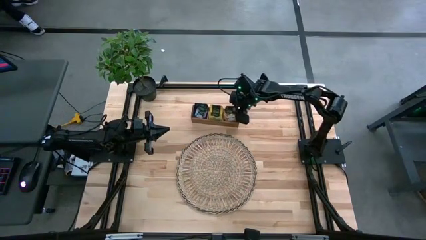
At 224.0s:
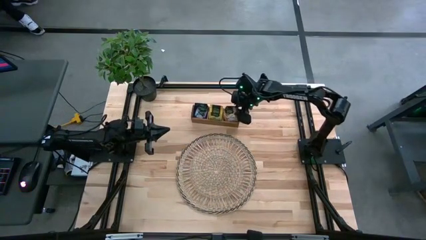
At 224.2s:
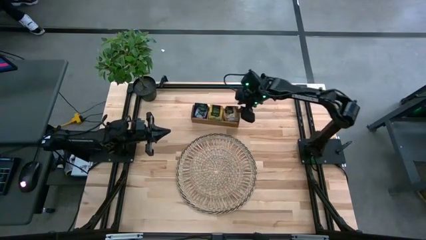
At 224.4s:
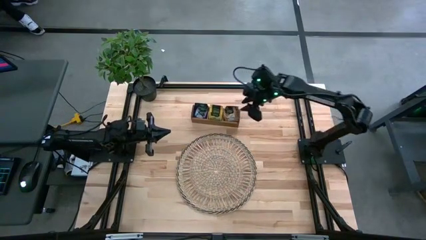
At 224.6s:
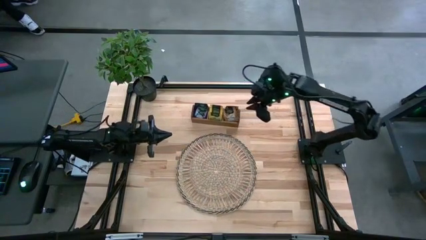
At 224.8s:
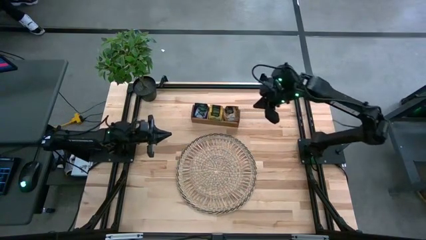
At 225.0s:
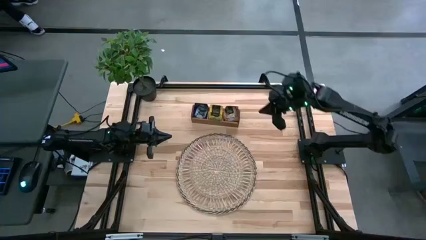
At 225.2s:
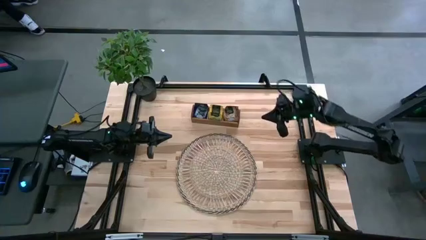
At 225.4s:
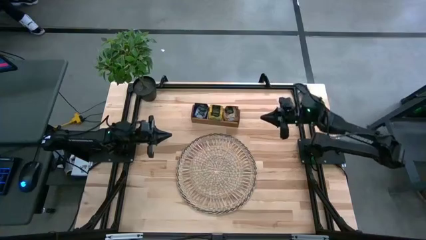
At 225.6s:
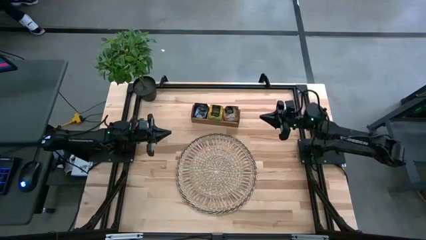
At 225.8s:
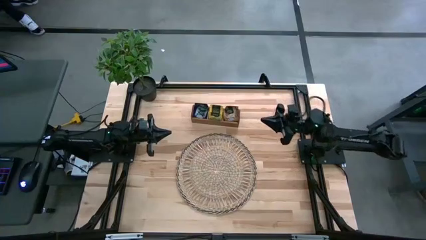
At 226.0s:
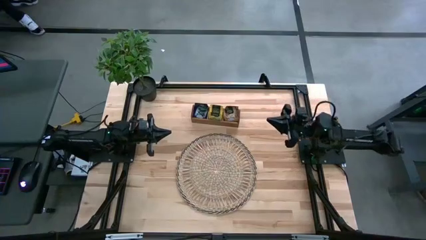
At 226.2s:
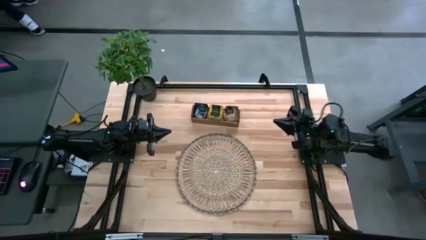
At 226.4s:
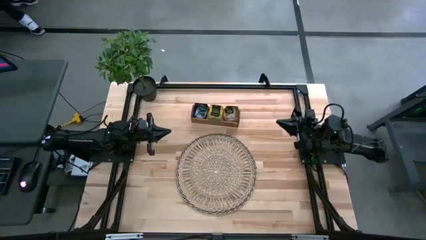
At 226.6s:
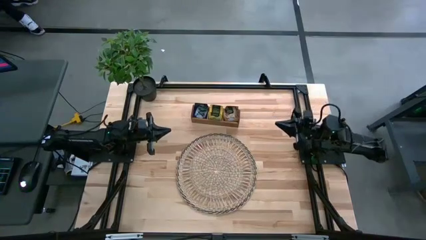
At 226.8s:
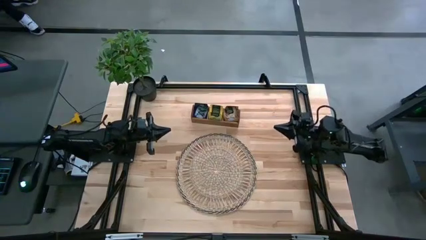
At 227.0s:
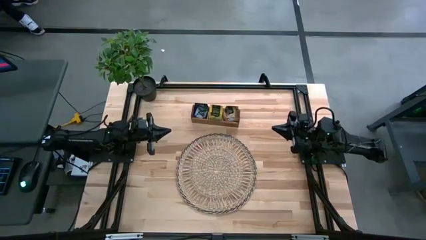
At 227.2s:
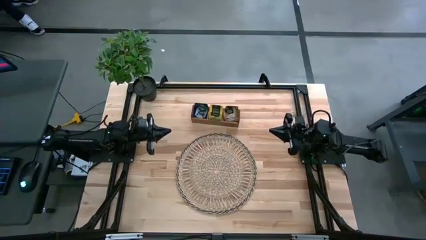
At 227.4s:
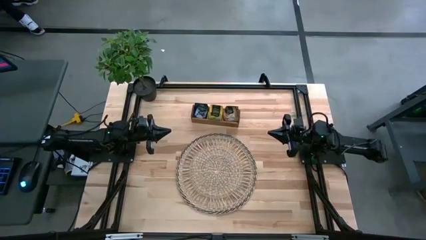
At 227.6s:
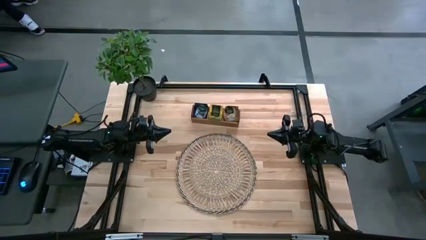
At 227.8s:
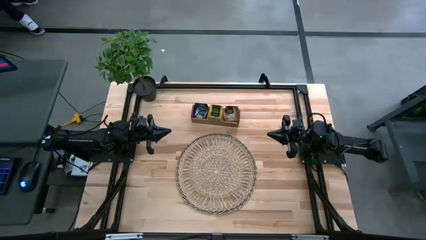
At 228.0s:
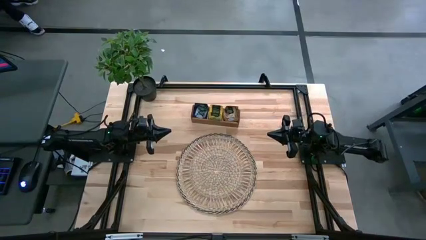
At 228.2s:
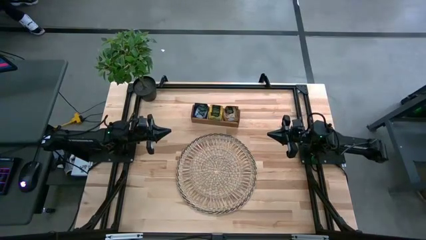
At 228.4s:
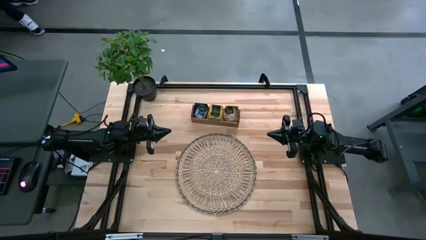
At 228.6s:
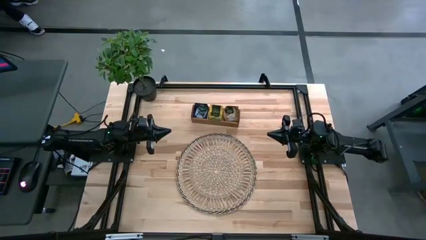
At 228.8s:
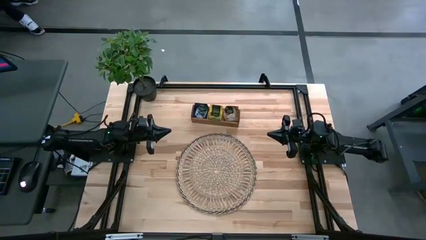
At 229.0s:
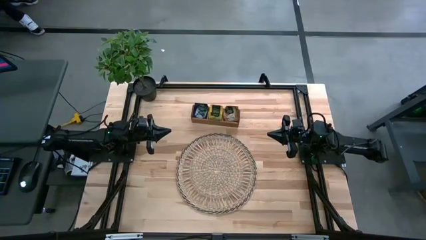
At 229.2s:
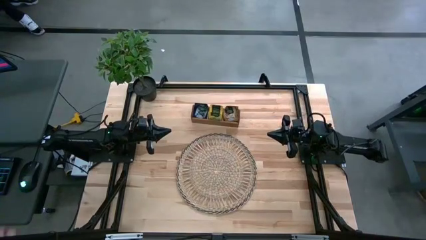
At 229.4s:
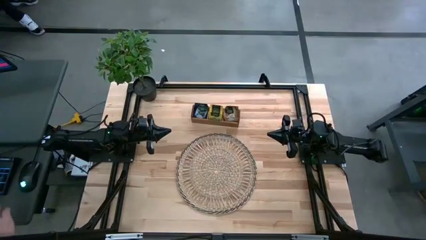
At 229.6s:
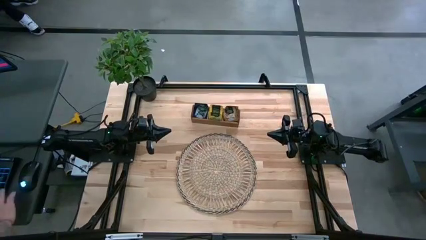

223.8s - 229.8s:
Task: Pick & Place Tea
Return to Home Position

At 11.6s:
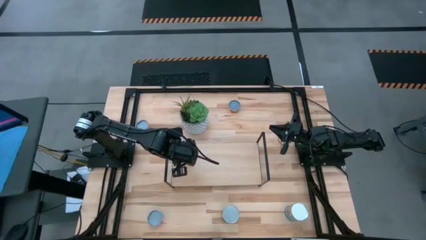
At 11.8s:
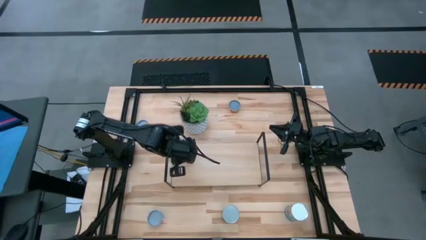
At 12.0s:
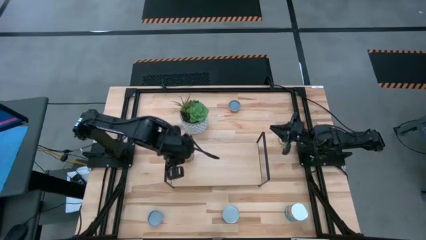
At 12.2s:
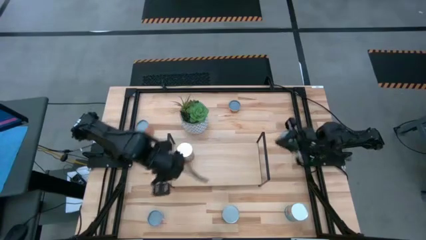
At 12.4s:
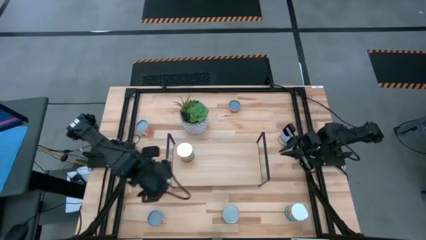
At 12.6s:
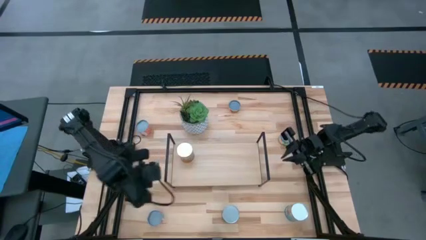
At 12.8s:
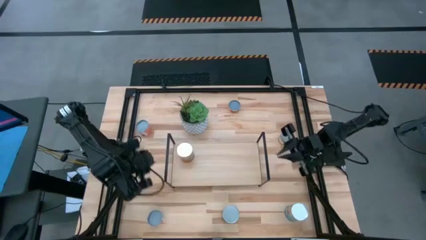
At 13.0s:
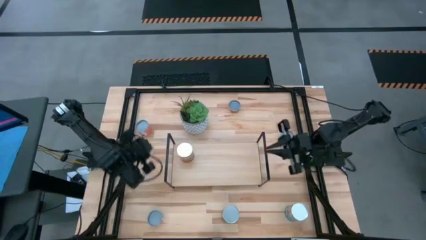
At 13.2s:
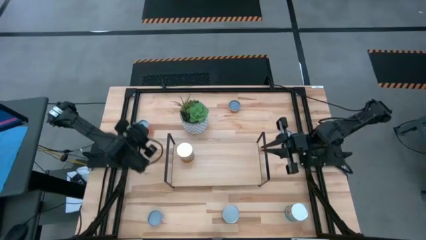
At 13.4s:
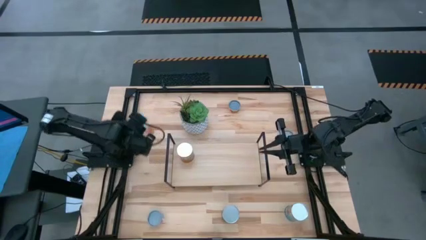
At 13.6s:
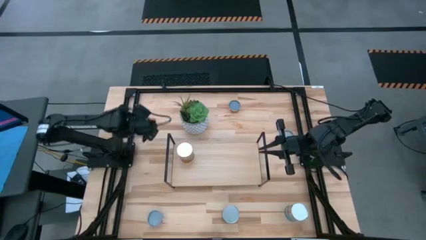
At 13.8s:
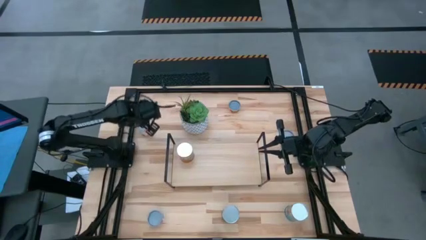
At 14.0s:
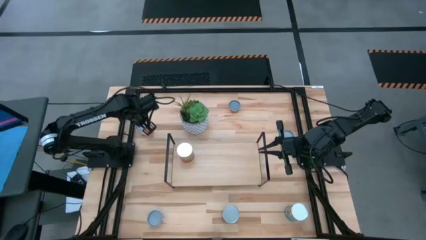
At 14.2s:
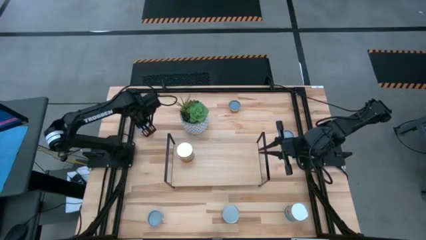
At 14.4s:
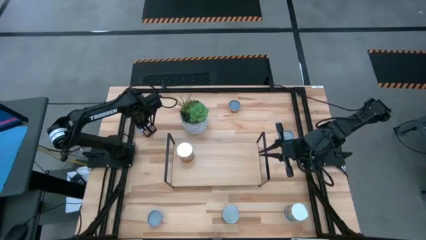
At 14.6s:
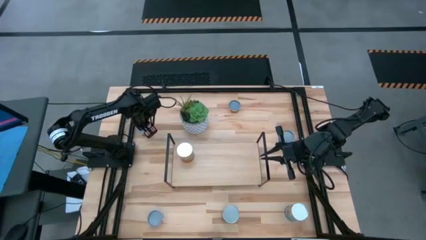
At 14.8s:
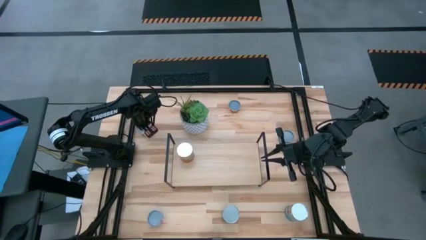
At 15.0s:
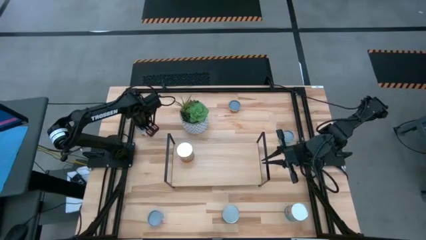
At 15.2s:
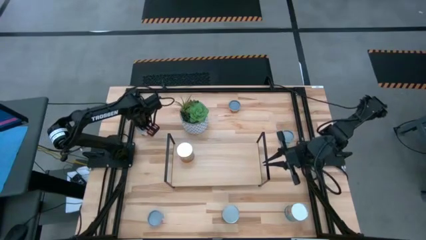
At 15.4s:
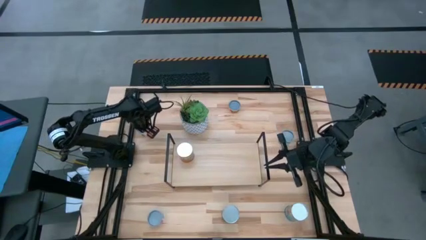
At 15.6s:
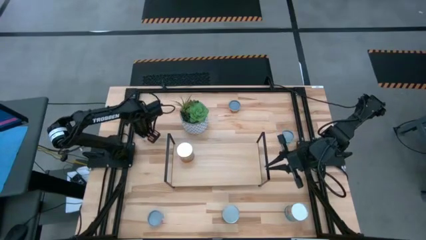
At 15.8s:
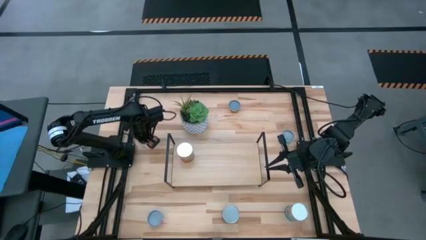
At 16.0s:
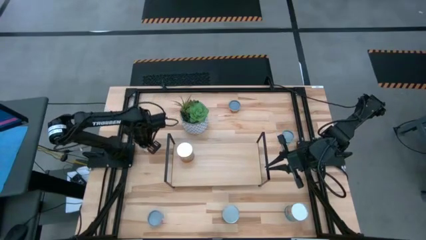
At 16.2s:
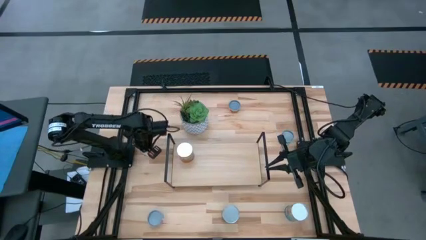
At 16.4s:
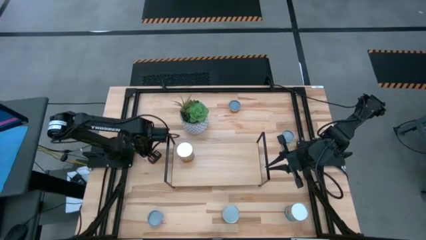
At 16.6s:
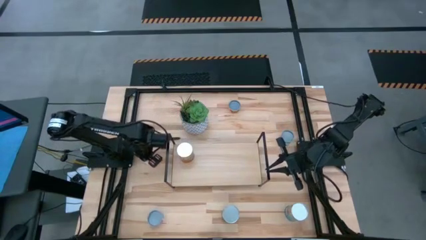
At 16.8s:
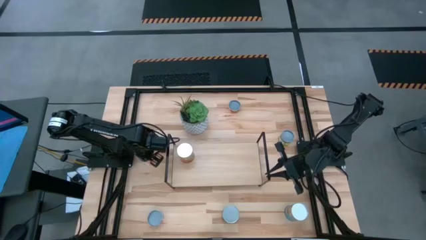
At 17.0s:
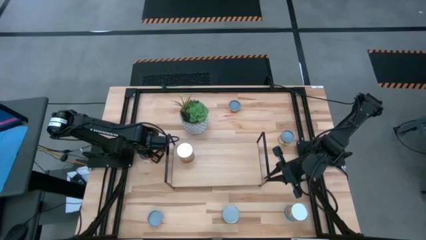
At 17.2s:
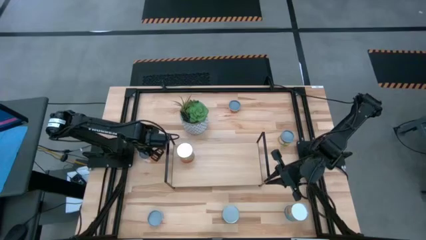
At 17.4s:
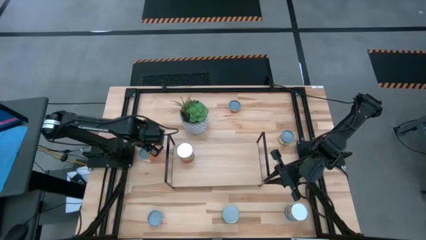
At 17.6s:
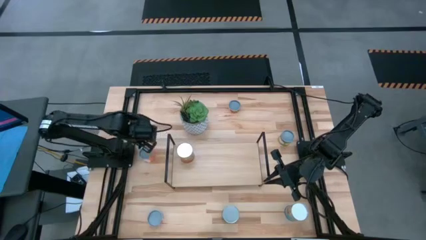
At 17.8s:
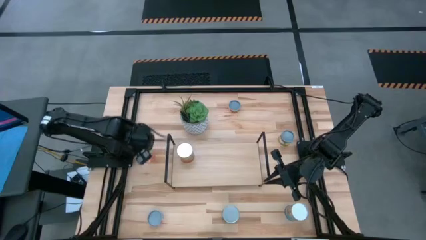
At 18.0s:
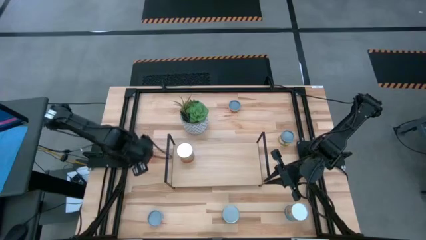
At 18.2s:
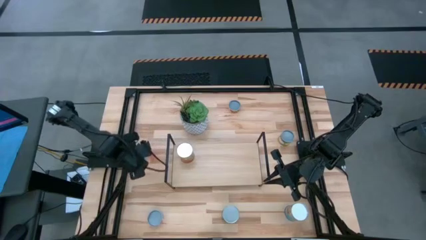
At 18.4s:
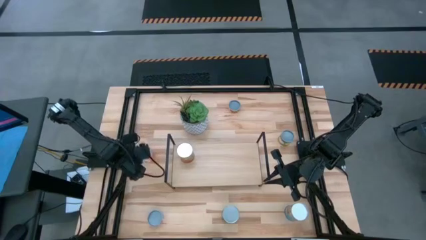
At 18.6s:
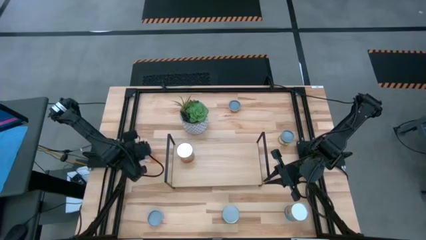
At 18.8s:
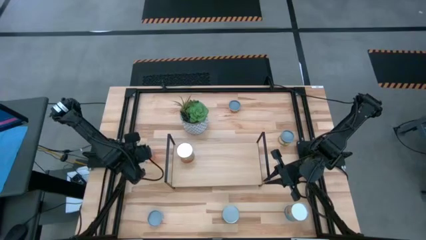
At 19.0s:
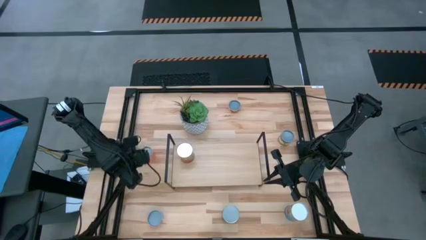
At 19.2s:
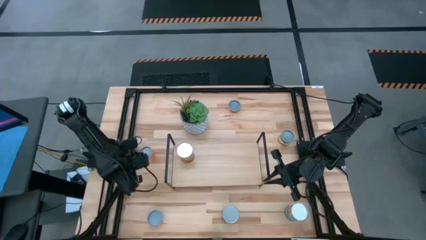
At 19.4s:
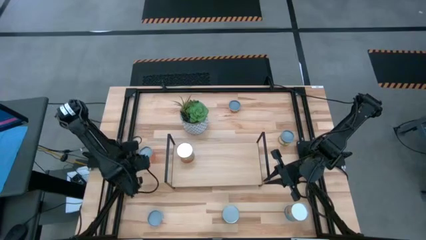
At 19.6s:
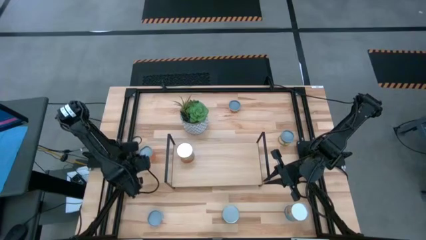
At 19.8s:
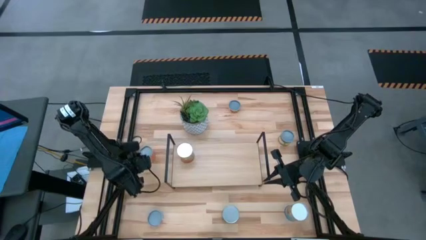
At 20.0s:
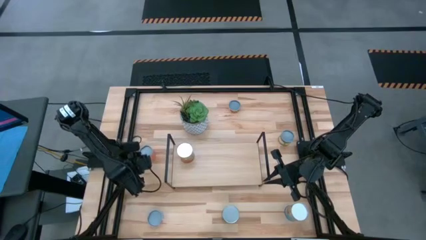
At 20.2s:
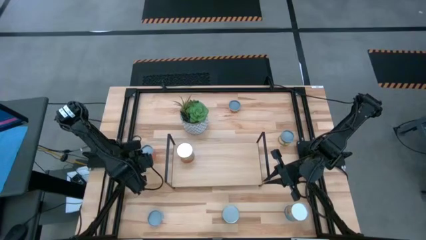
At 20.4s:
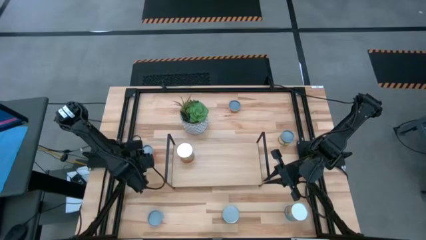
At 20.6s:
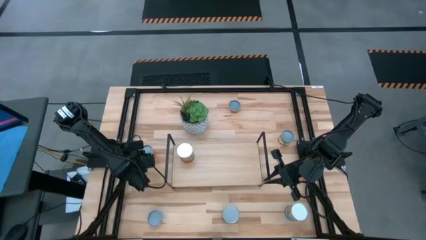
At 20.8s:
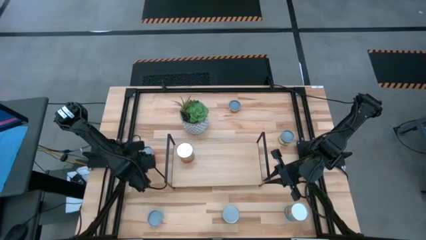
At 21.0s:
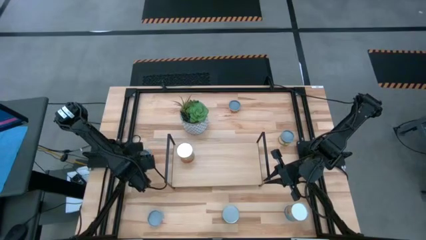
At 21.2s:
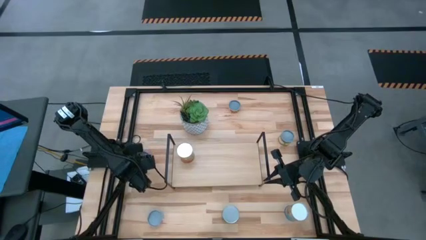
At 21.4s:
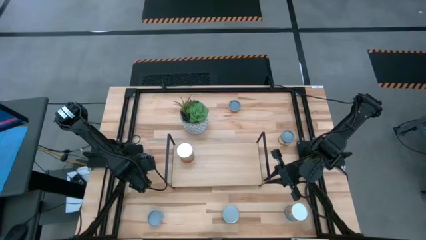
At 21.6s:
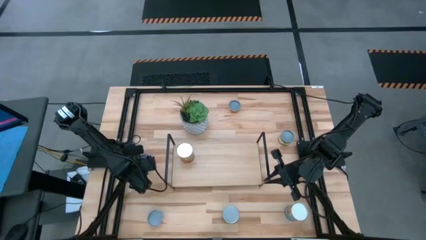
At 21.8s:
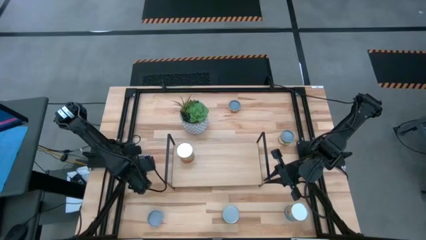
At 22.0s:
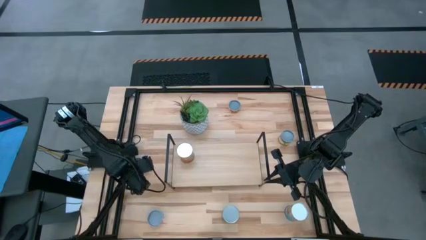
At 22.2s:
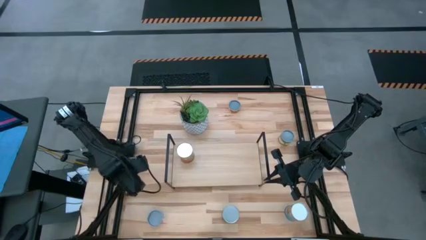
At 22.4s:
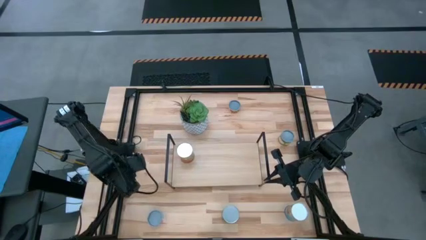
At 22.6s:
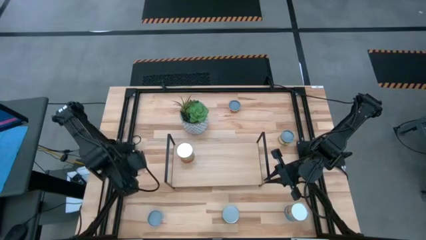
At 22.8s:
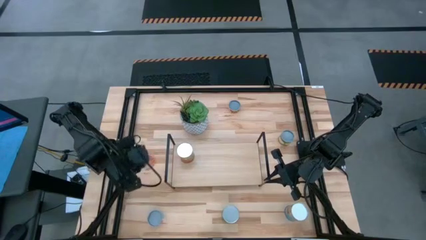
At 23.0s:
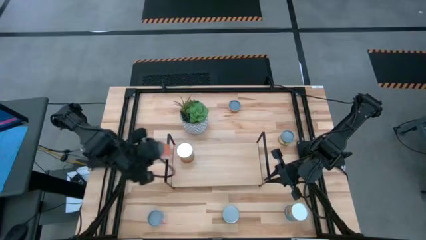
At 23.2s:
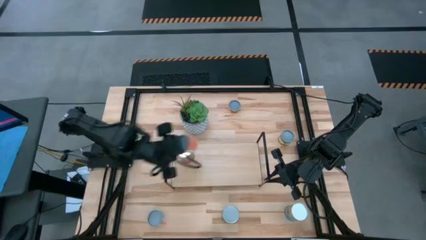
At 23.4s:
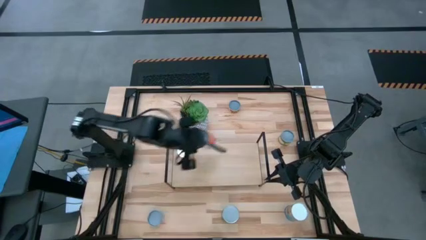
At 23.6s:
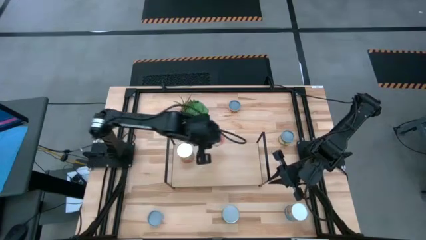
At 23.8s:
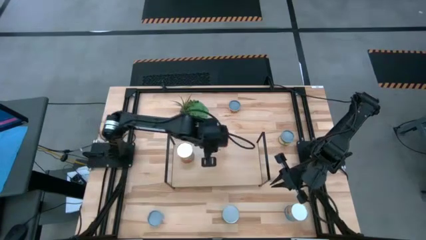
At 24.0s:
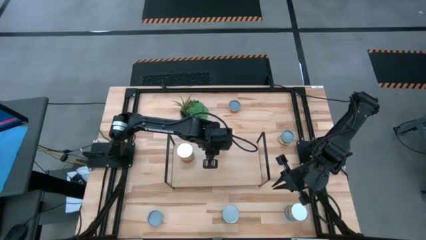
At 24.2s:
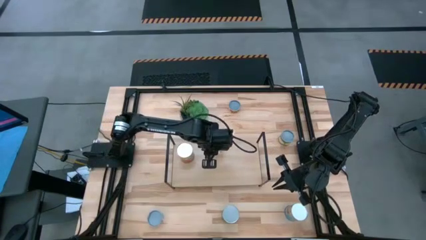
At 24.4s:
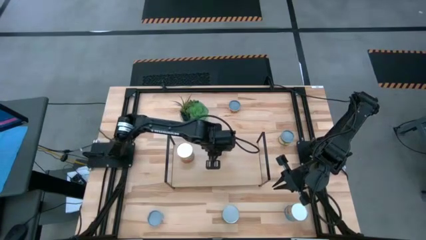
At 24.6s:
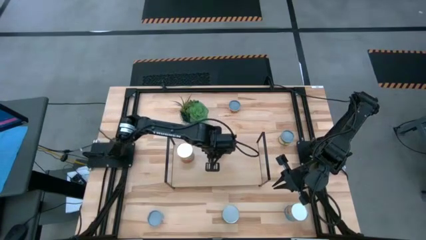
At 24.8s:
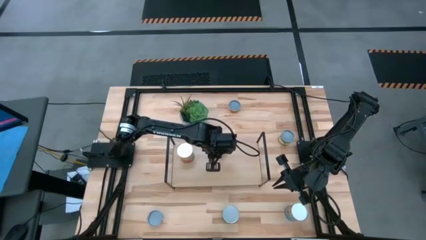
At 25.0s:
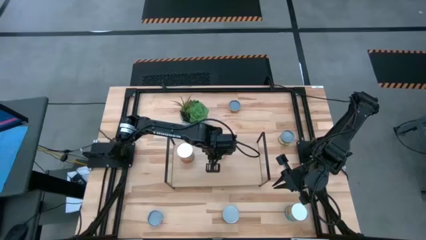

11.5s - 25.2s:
Task: Pick and place cans onto a shelf
Put the canned saucy meatballs on the shelf
